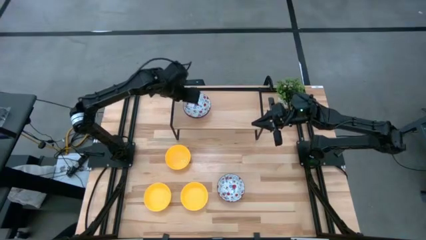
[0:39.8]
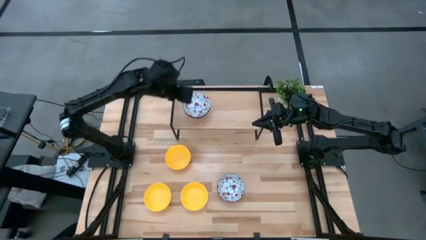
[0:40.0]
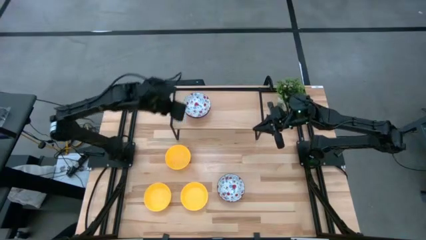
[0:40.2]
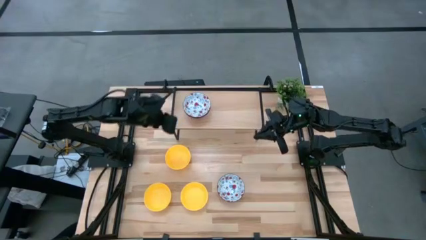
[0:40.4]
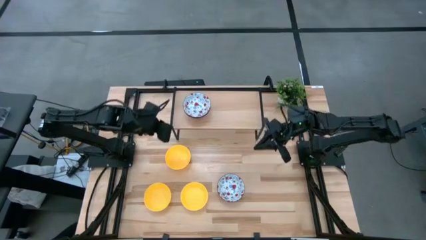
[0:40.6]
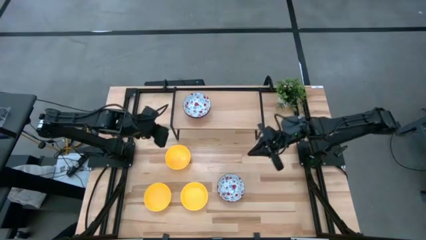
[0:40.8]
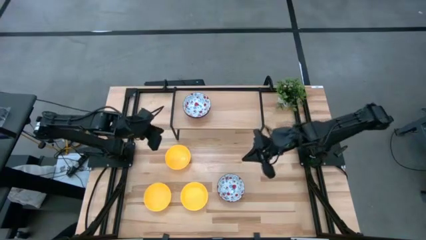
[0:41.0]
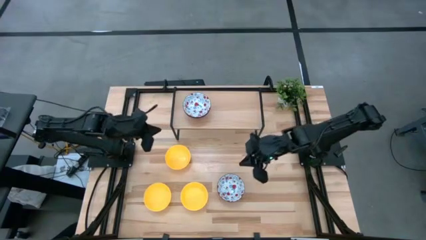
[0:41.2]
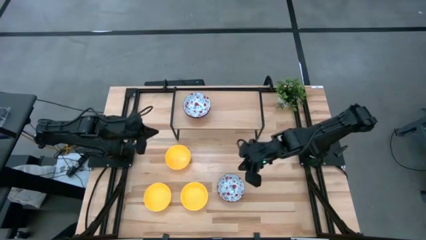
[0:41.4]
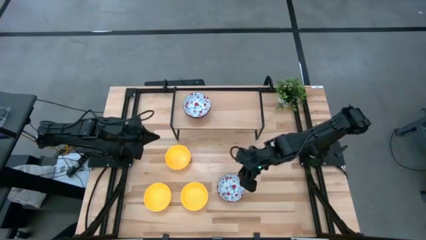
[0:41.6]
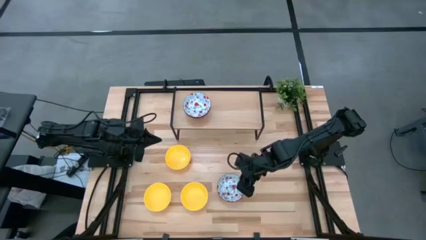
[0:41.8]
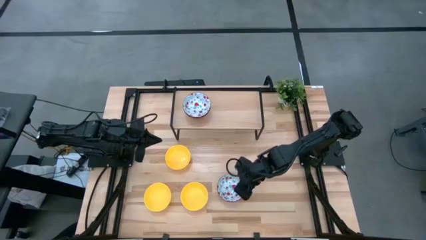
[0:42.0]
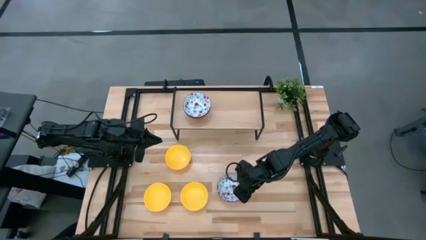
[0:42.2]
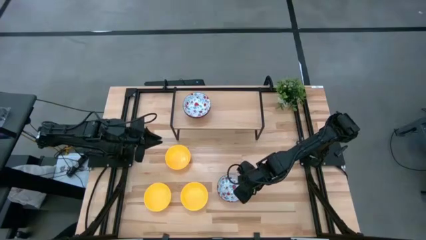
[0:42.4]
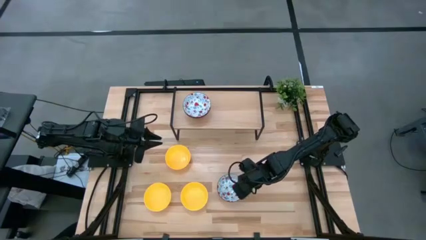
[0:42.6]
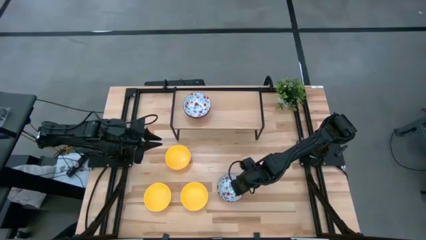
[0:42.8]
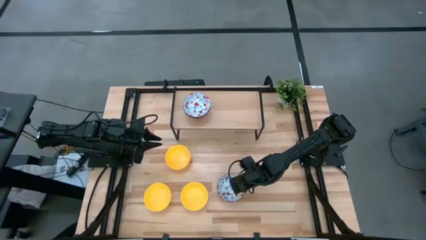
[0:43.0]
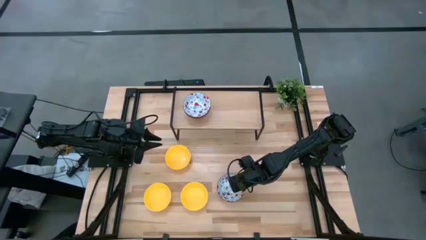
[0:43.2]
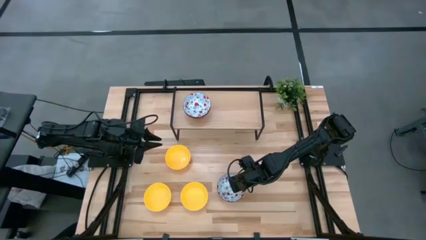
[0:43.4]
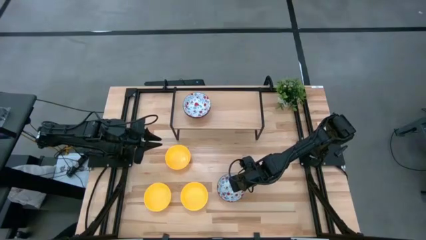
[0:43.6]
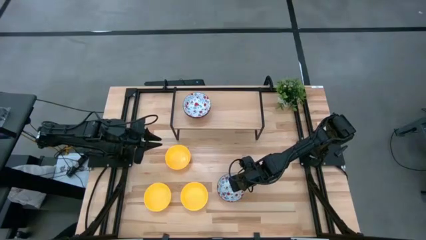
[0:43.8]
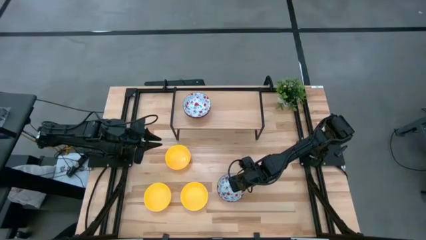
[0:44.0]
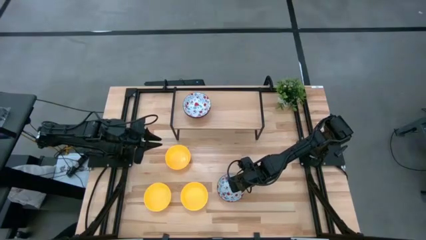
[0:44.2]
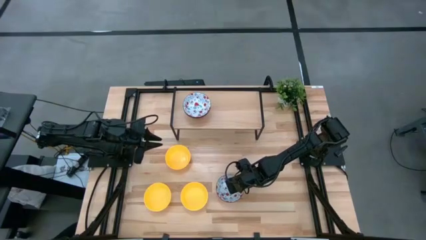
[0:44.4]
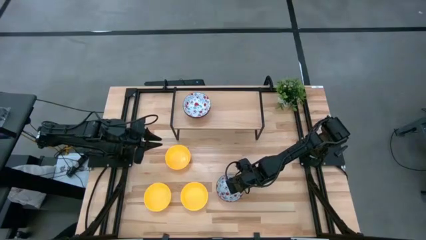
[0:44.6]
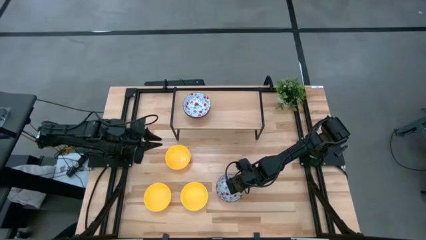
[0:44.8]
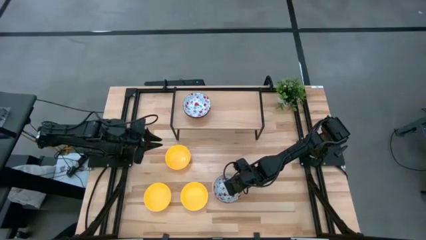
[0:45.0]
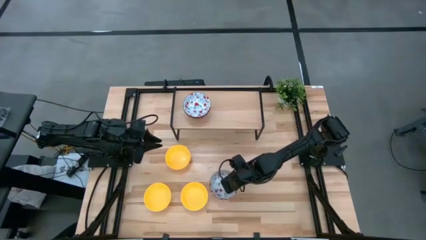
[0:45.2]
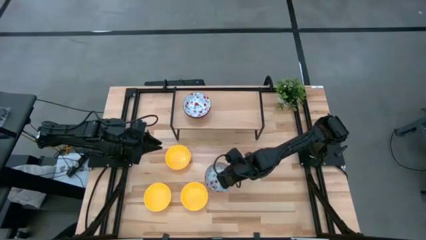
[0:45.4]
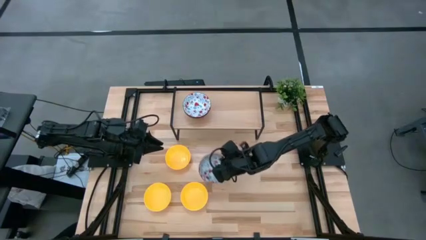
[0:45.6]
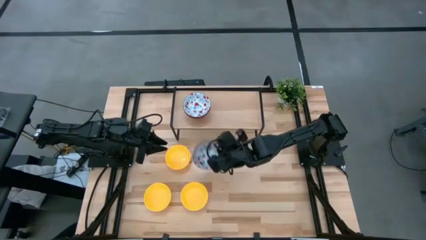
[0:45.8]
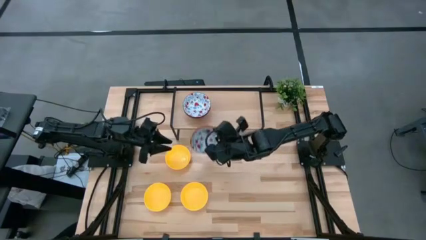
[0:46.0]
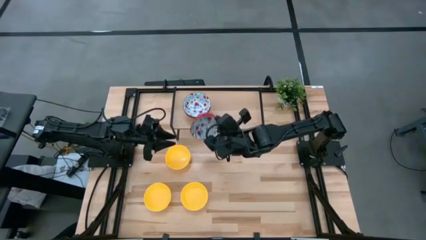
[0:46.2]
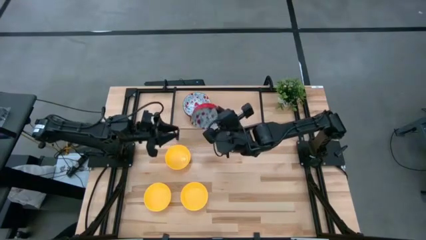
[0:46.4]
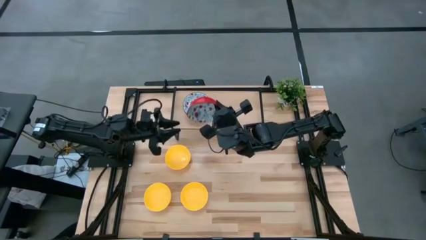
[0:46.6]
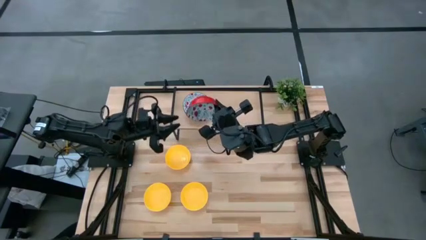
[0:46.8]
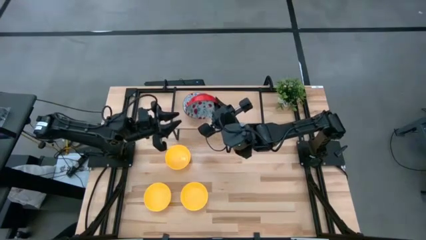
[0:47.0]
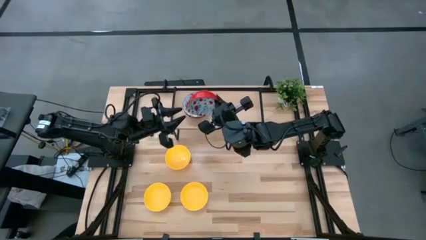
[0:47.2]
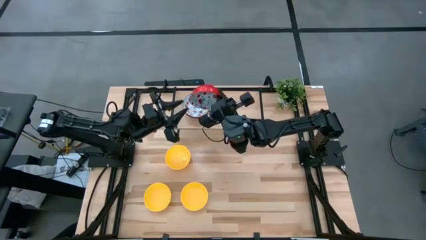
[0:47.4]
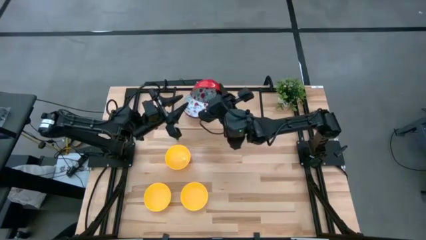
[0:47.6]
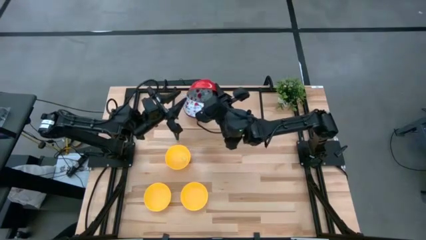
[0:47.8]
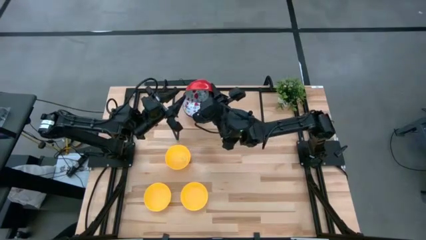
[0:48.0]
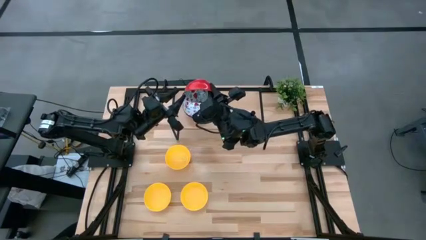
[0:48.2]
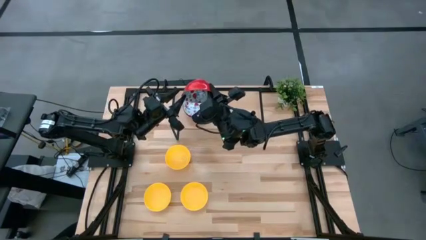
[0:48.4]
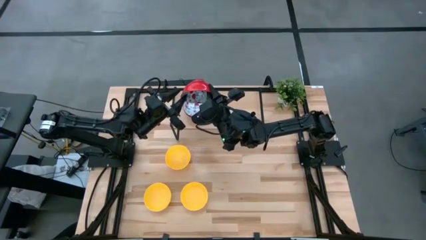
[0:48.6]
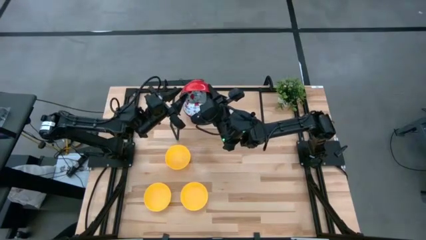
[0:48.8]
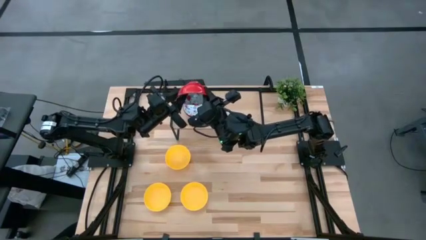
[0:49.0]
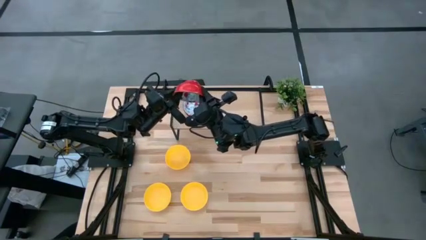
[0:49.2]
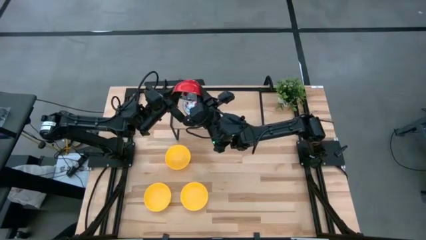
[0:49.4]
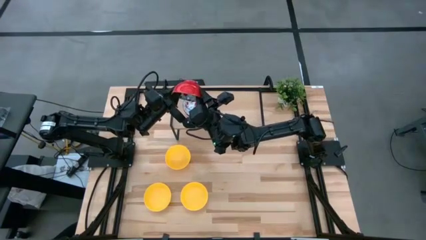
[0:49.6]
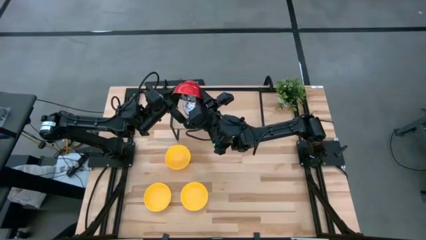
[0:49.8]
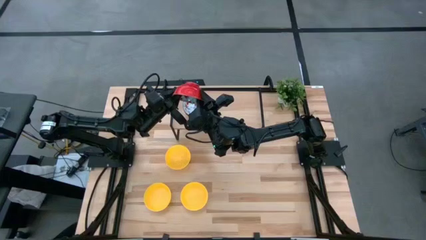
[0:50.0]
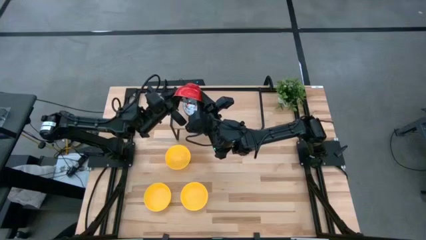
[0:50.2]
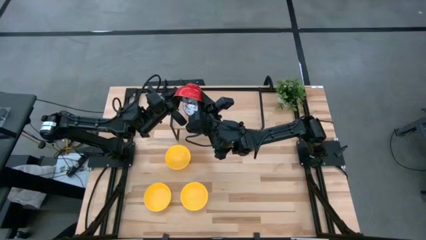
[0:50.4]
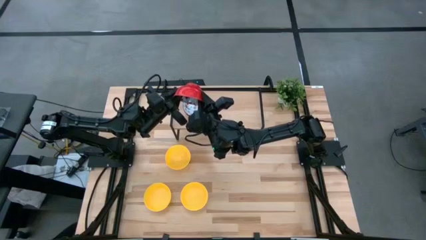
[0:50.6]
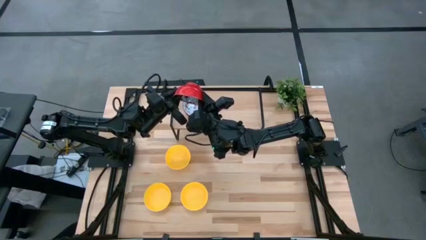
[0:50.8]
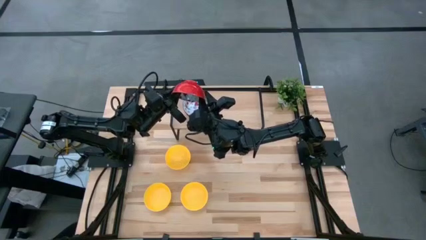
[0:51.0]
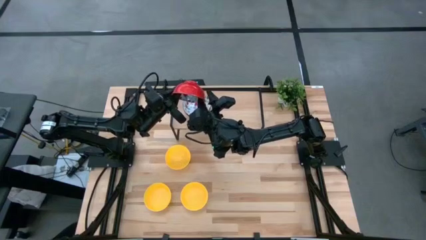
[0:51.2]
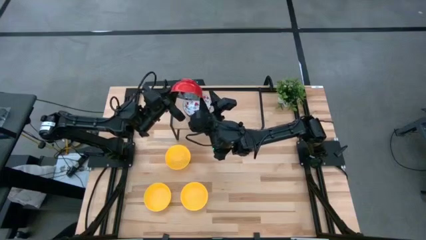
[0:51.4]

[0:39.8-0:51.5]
Task: Pick & Place Mini bowls
Stack the red bowl on the red bowl on the shelf
